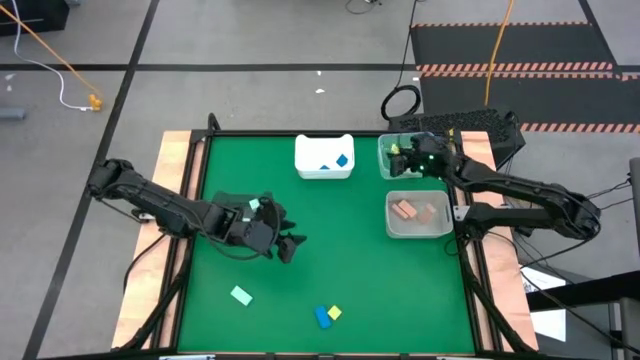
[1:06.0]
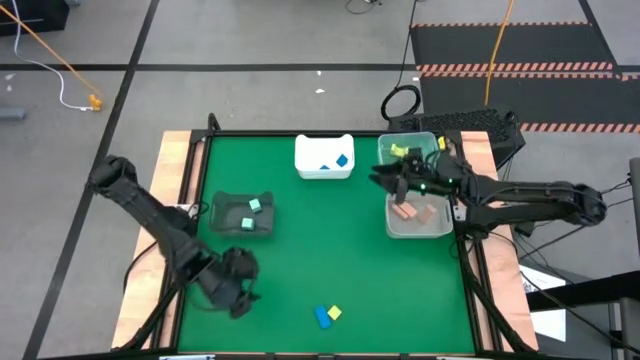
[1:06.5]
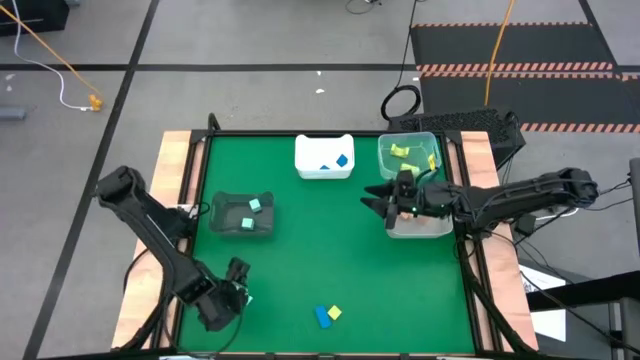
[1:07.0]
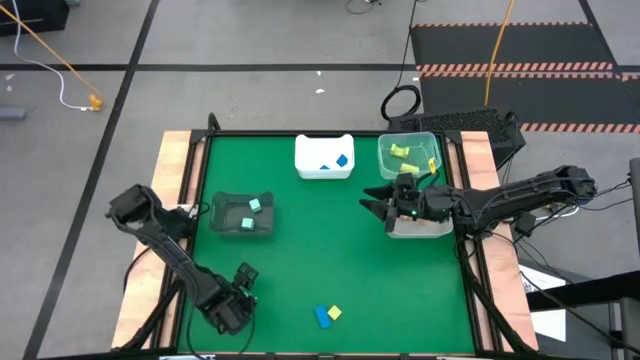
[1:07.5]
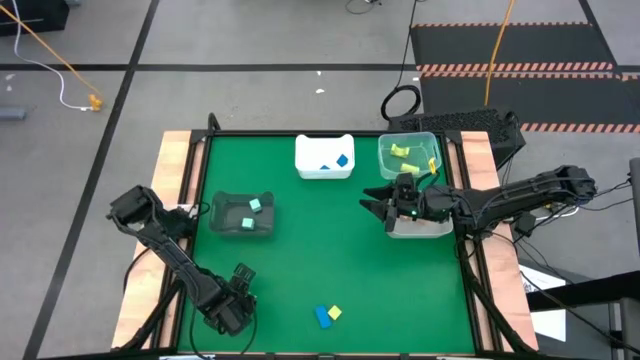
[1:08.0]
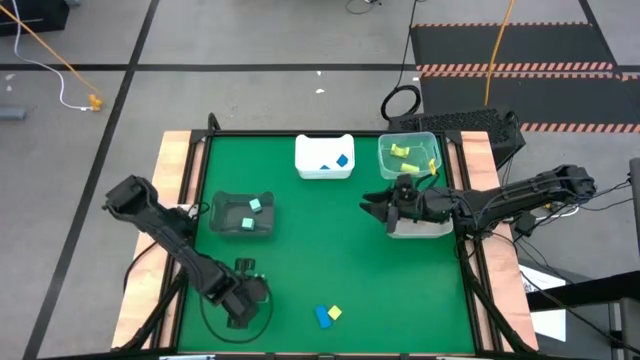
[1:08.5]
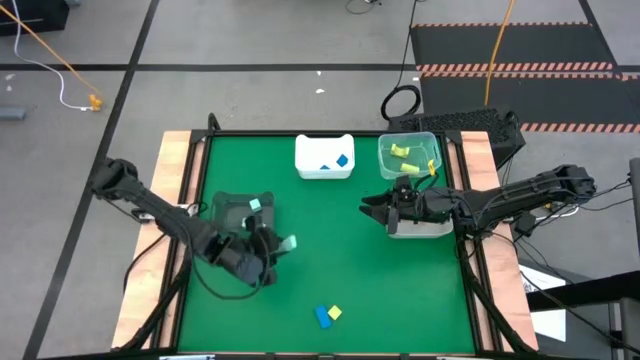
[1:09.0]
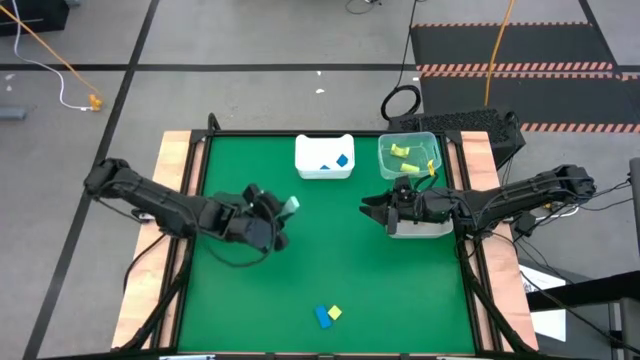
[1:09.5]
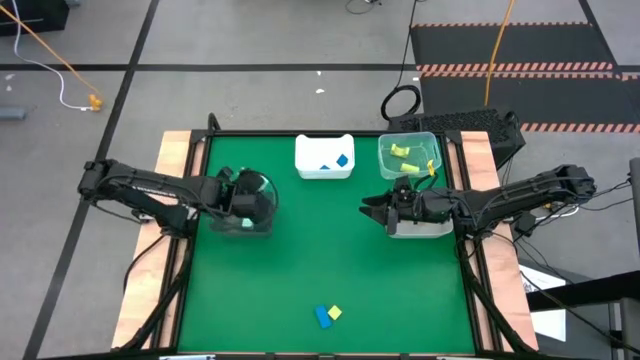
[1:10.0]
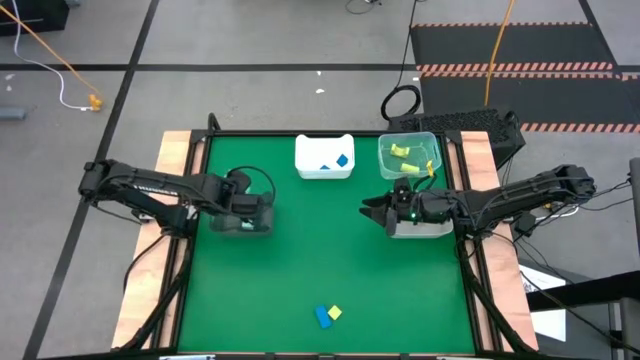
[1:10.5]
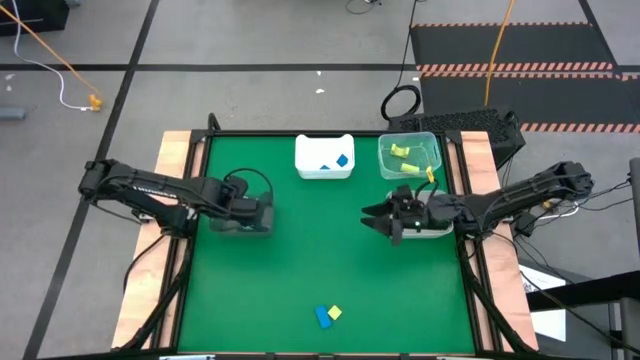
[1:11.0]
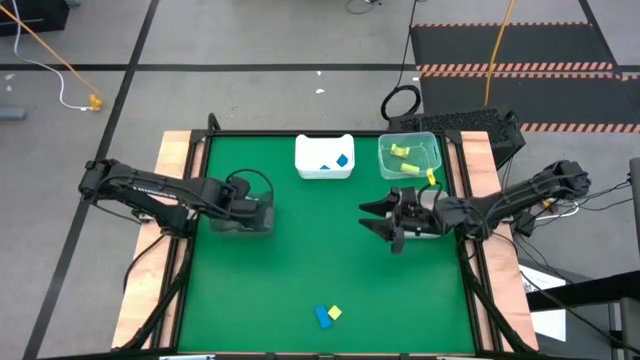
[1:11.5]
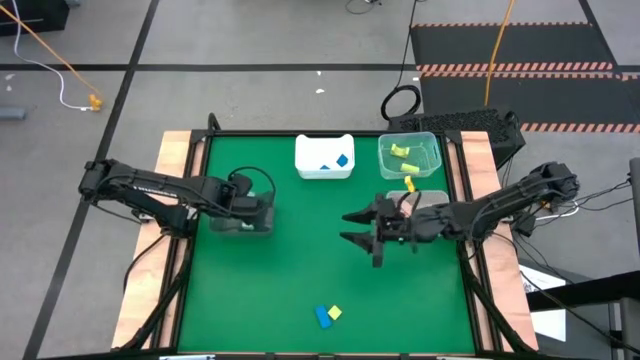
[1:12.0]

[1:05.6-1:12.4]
Task: Sort & place blocks by color
Put the light blue block into the black bin

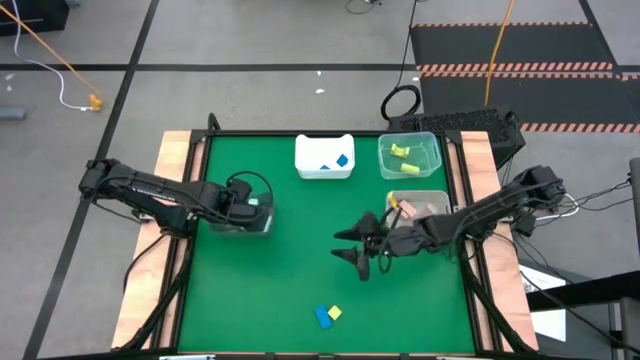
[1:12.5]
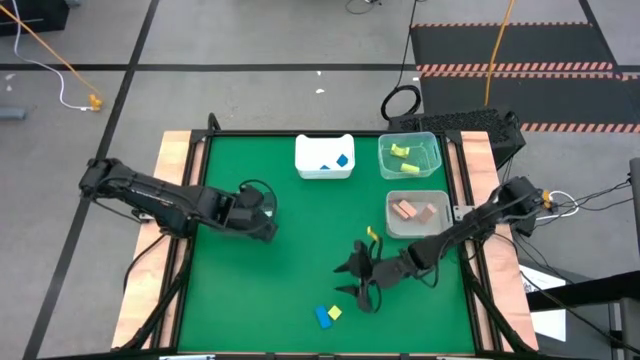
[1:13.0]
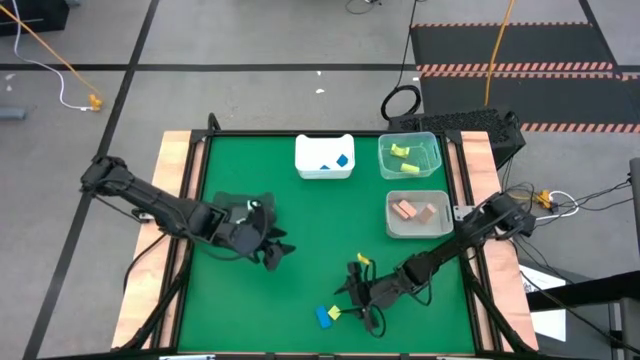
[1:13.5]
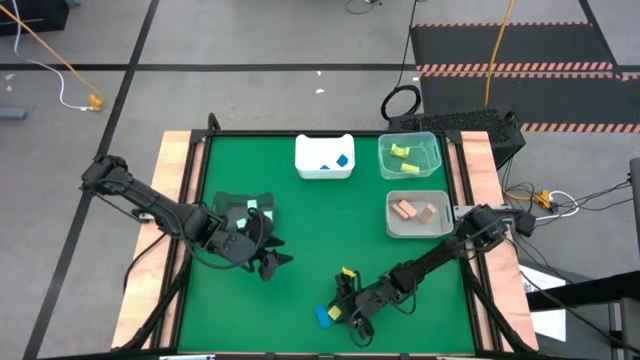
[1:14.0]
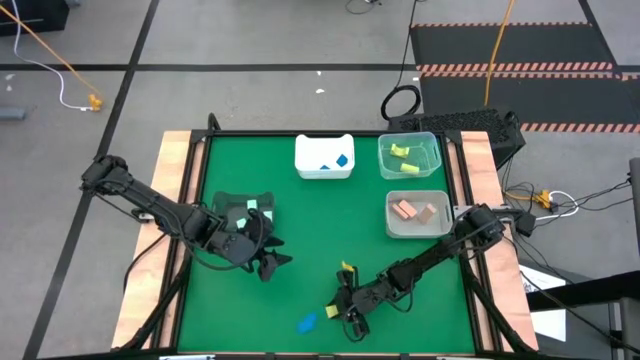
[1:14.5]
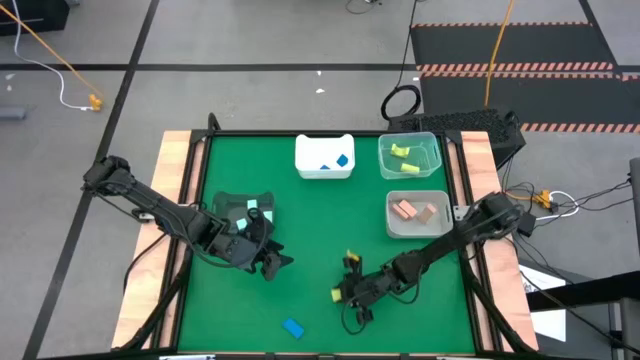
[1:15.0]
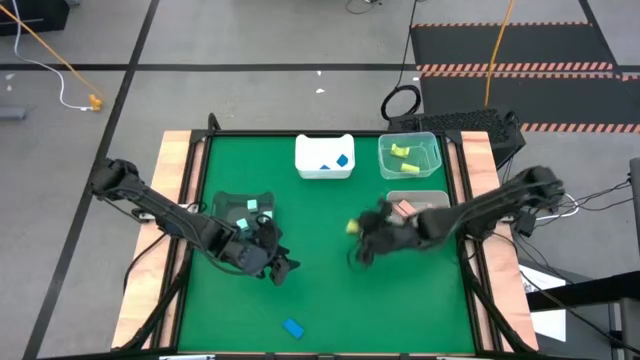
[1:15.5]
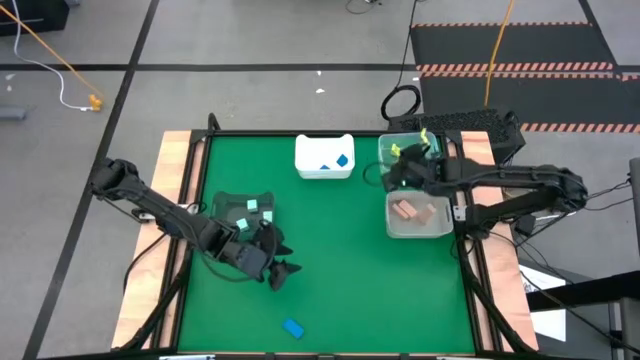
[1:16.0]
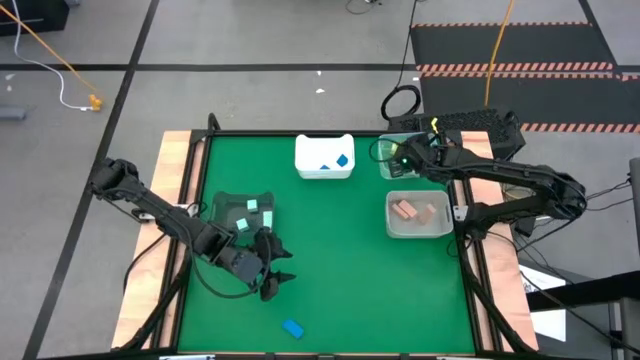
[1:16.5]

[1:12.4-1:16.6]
Put the green block into the transparent bin

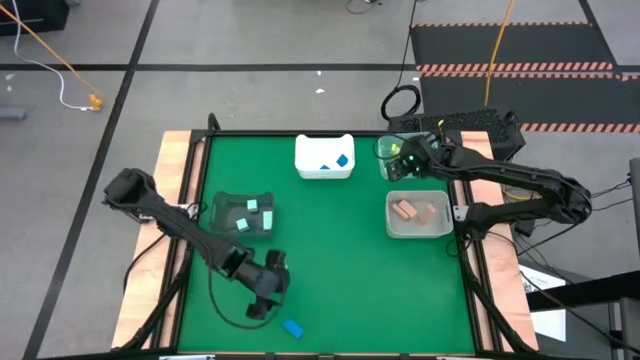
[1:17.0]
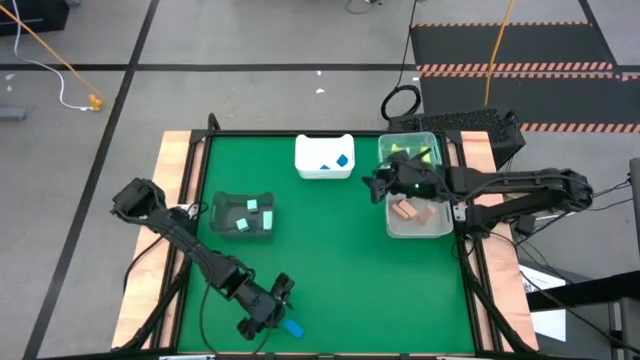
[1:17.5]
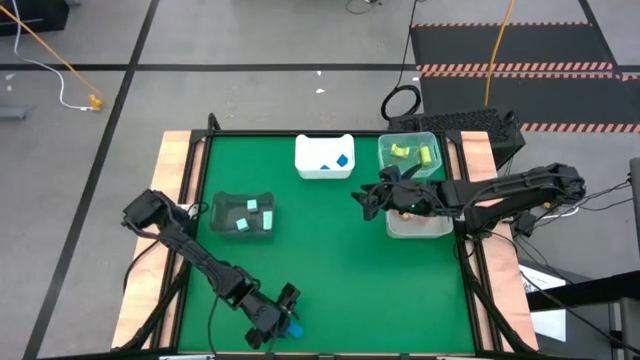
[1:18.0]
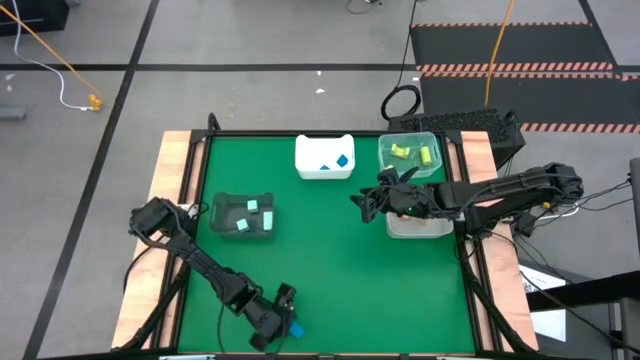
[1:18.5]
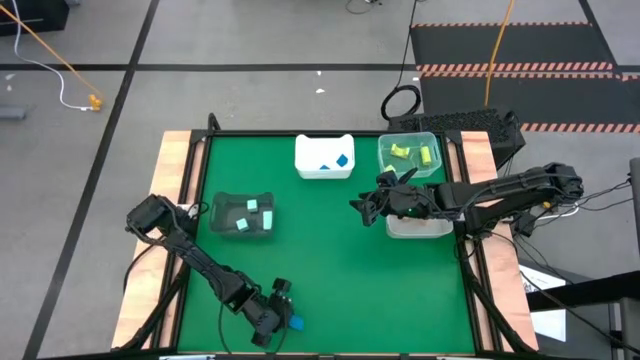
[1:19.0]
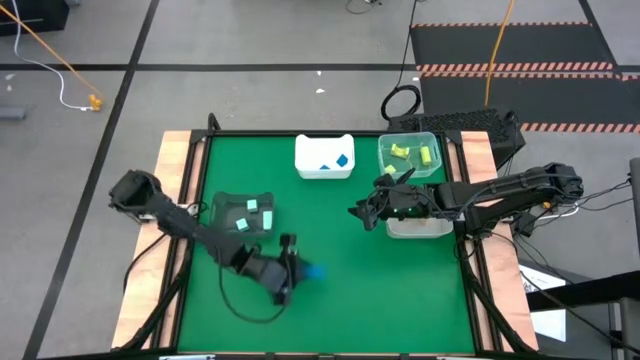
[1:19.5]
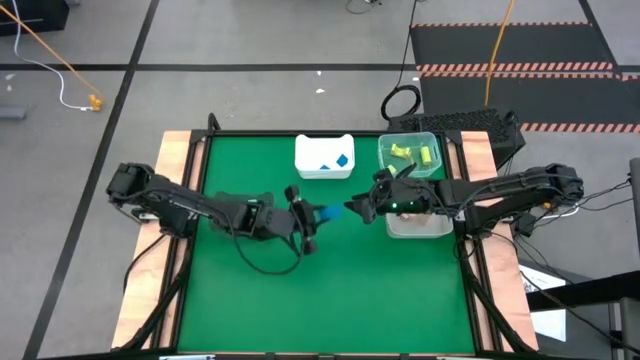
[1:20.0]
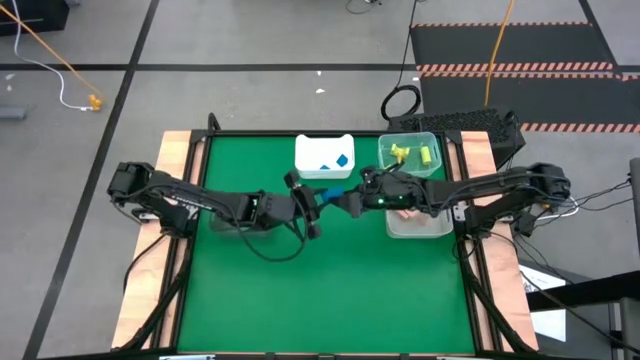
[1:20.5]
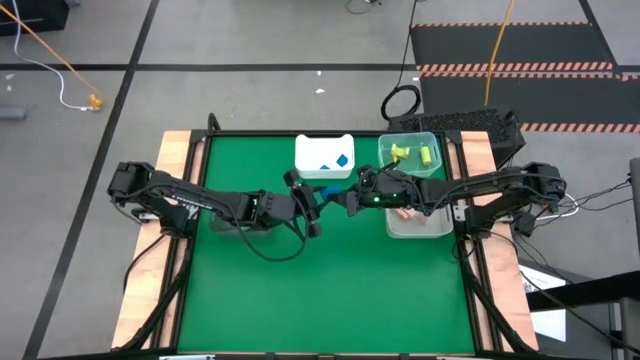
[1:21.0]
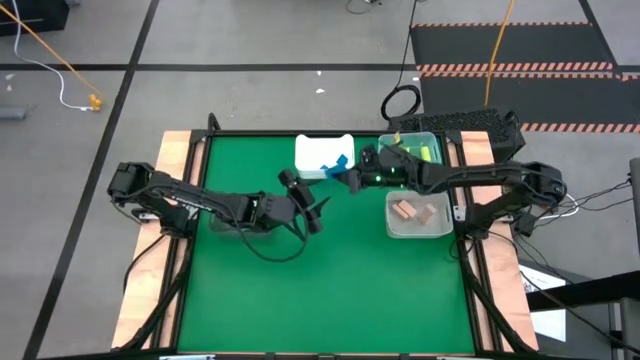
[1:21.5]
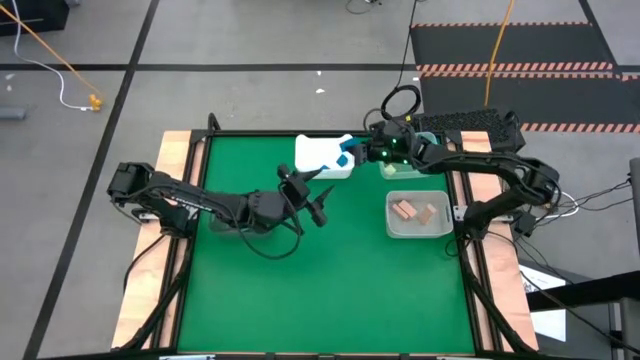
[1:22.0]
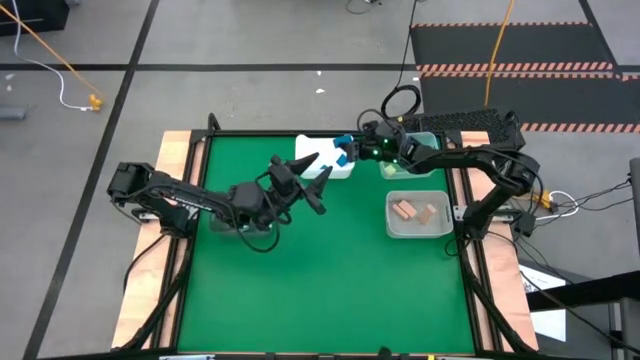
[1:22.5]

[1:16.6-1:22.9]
Put the blue block into the white bin

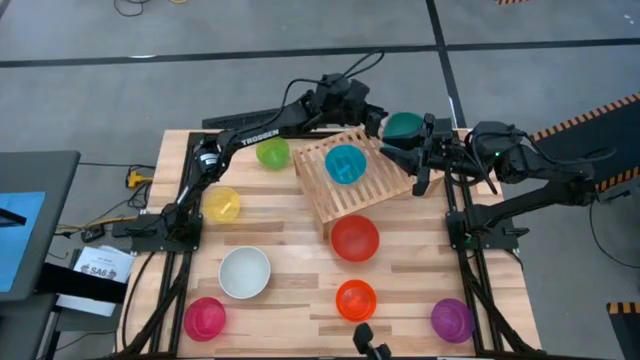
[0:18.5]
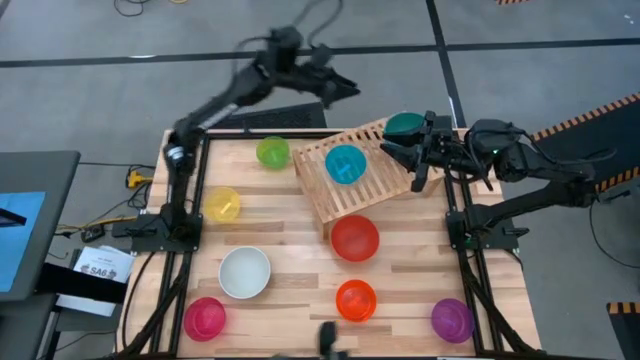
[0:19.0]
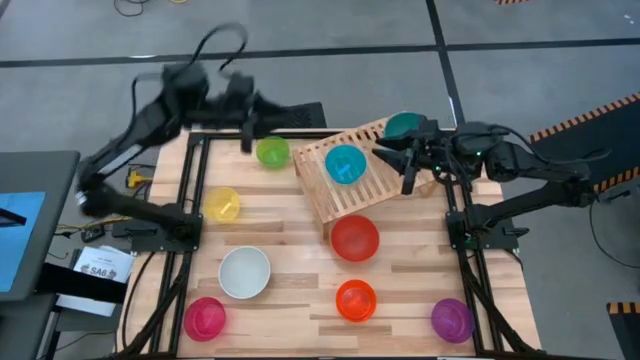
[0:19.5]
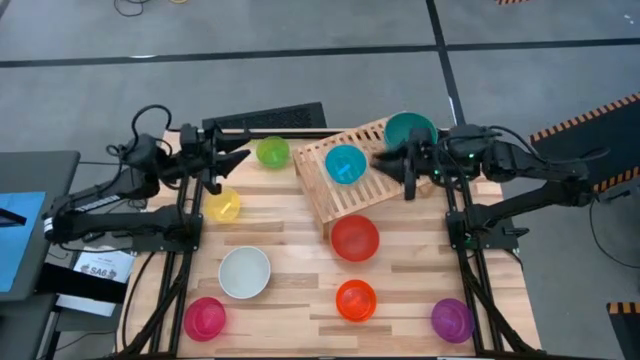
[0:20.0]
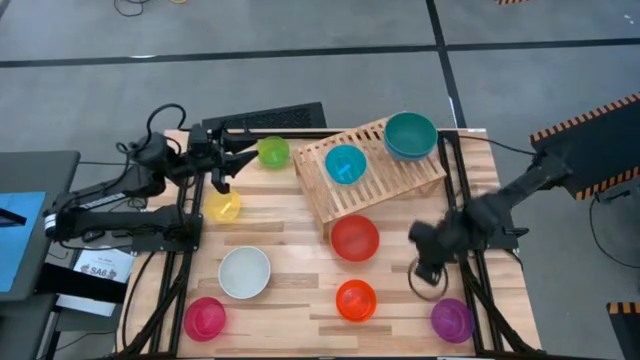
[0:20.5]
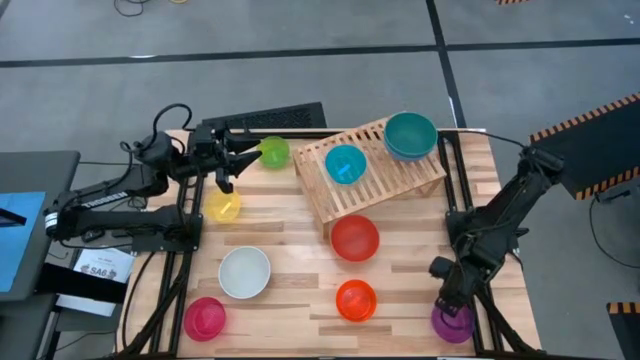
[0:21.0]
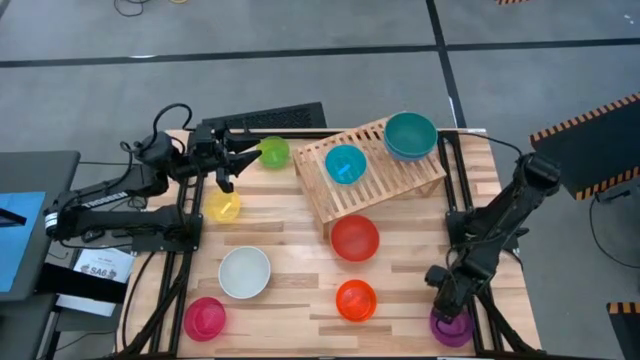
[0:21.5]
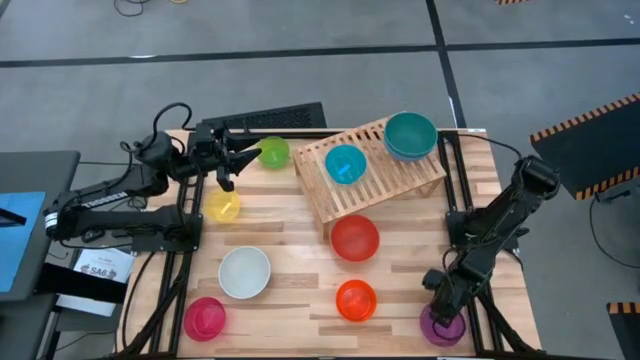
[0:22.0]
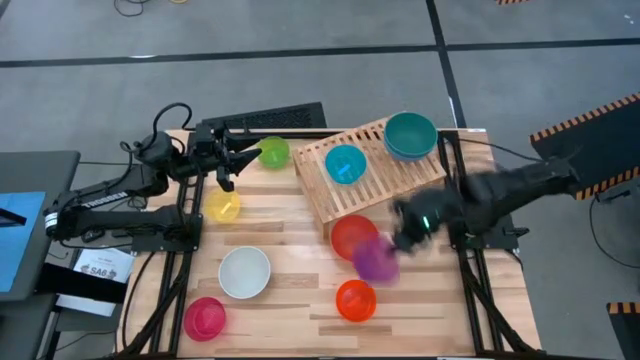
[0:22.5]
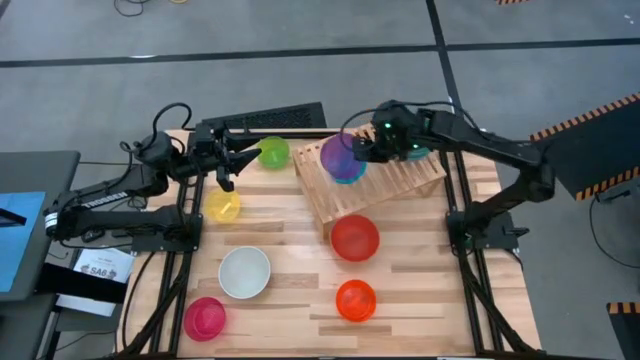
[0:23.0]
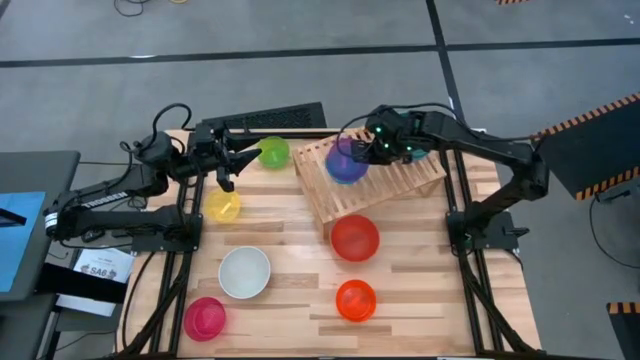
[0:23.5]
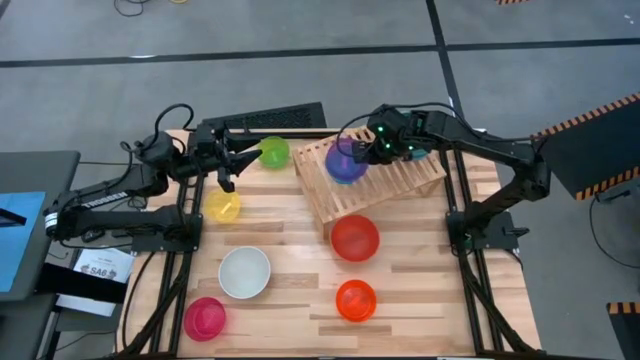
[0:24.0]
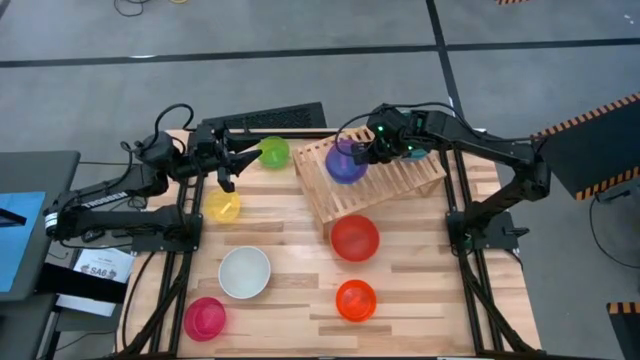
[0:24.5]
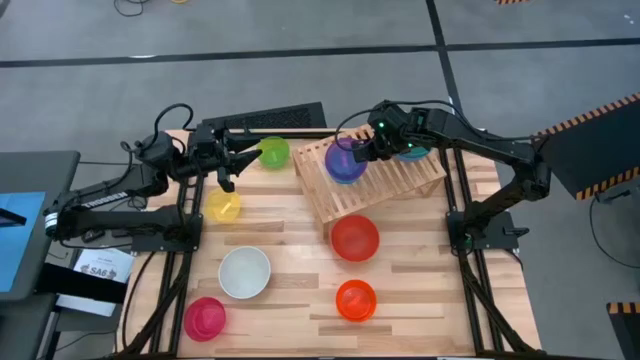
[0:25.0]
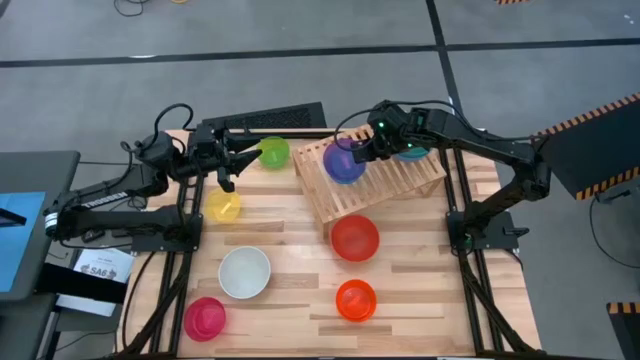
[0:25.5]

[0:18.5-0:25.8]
Task: Place and stack bowls onto a shelf
Stack the small violet bowl on top of the small blue bowl on the shelf
